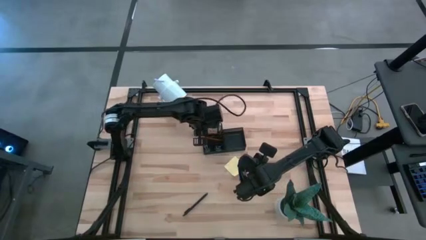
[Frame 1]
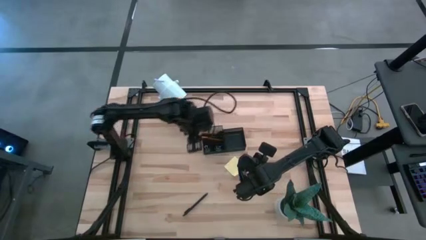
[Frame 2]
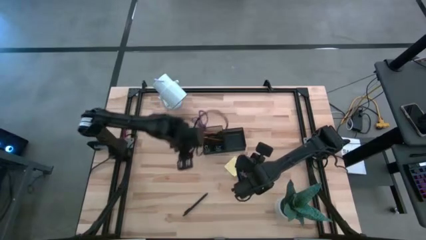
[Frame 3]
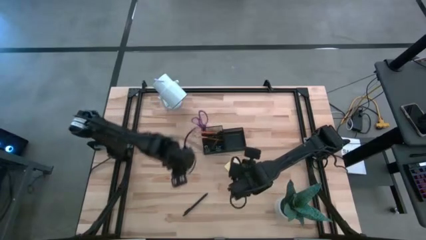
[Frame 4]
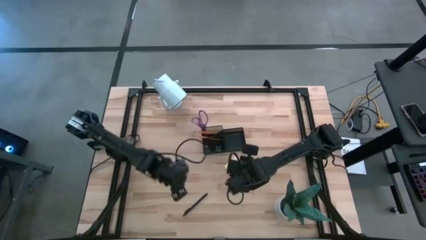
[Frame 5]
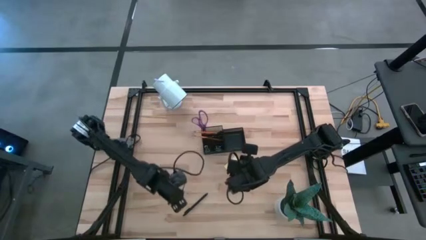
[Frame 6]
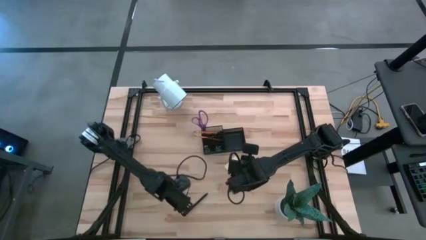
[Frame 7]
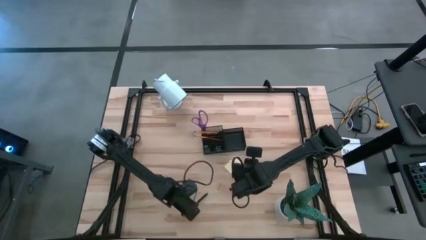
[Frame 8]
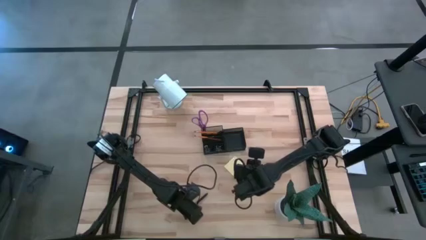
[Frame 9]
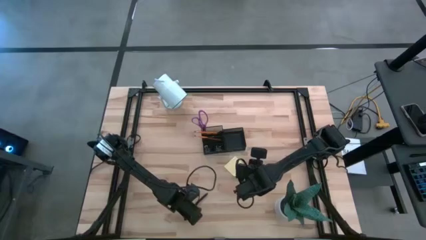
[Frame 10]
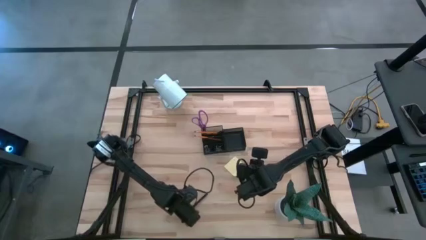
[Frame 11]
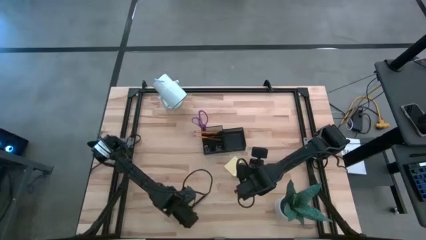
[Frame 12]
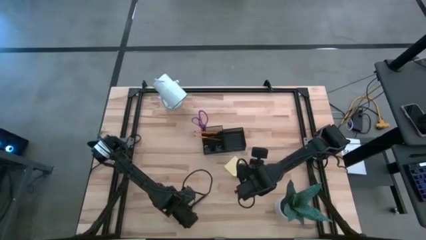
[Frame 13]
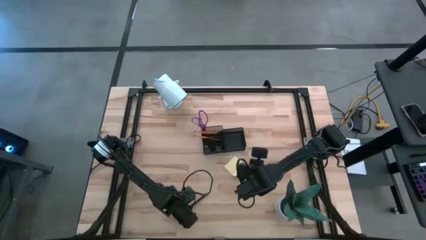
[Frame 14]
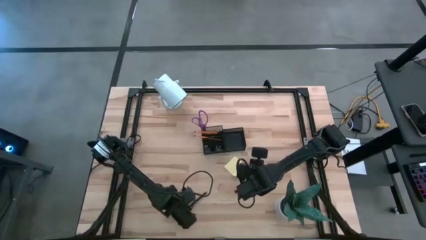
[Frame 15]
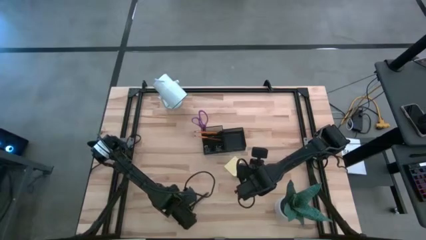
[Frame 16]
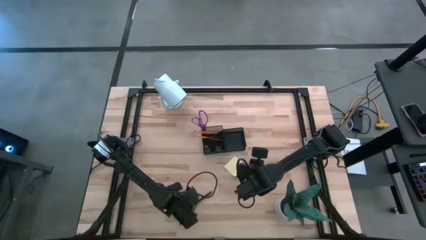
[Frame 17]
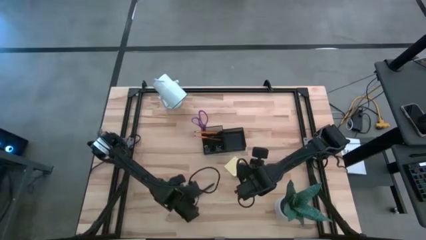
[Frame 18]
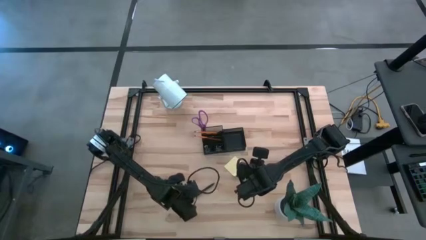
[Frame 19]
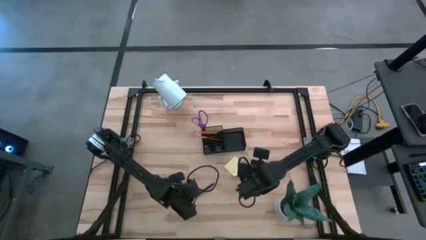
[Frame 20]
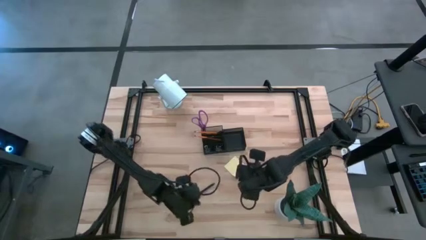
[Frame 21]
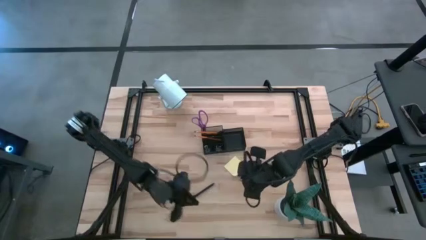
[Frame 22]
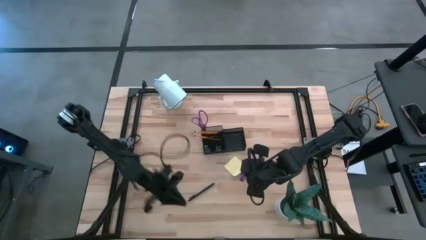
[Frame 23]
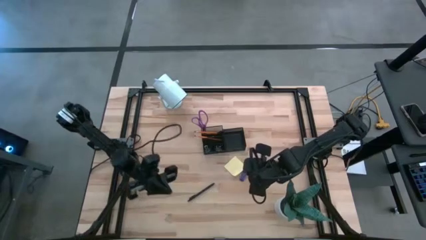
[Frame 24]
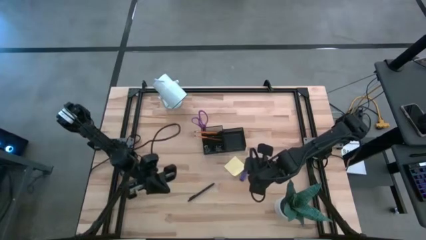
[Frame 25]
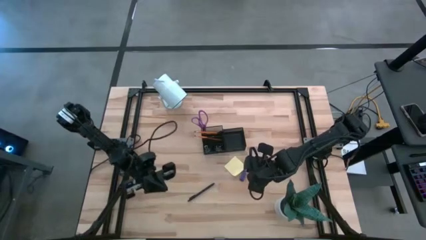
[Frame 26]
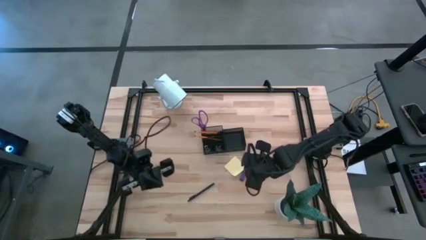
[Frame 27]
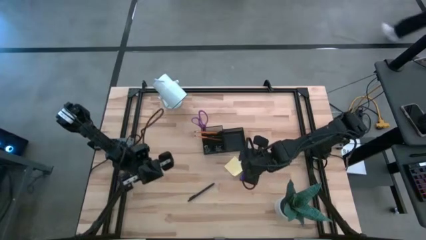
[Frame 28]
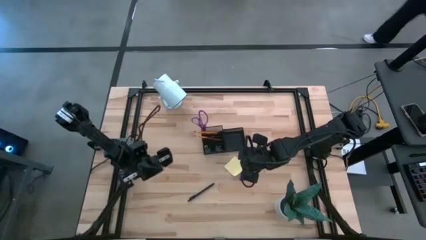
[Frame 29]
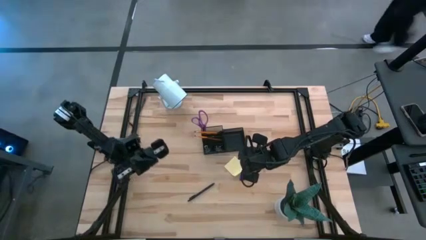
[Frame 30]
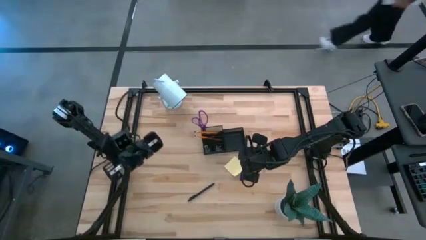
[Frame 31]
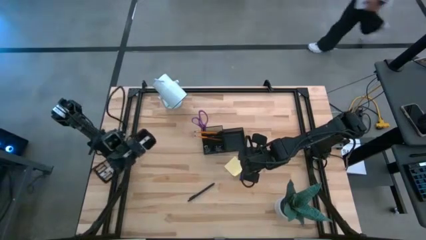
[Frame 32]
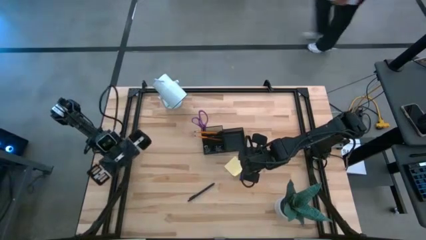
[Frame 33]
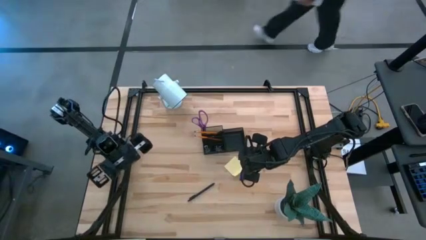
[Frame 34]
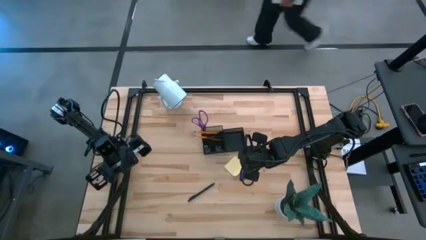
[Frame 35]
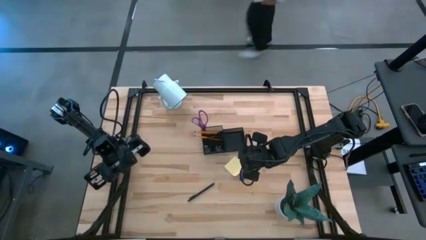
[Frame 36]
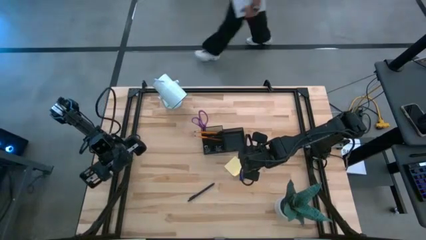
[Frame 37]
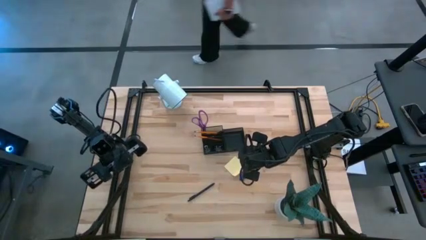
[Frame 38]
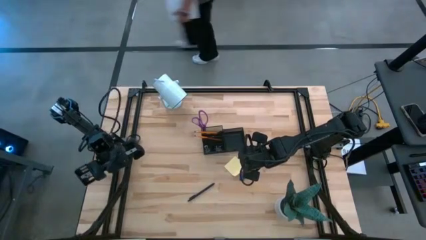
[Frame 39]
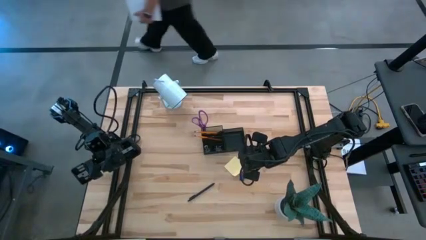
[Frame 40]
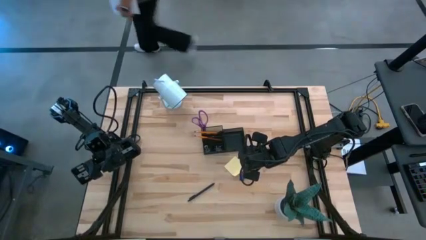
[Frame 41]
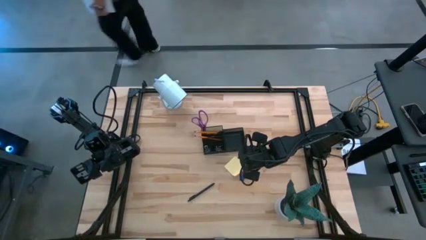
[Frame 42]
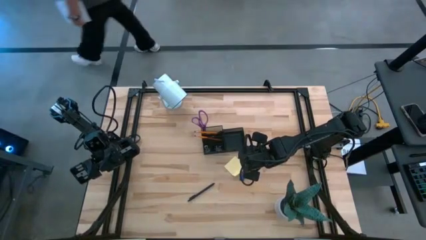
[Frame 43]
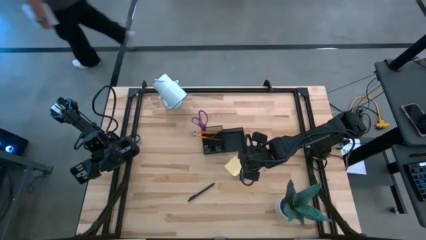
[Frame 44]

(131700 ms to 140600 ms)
Task: Pick and place office supplies into organizer
Put the black pen into the black desk organizer

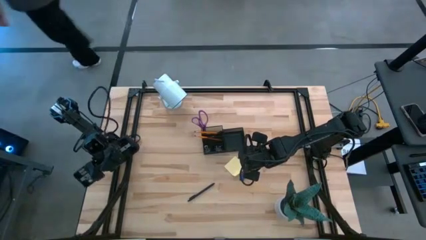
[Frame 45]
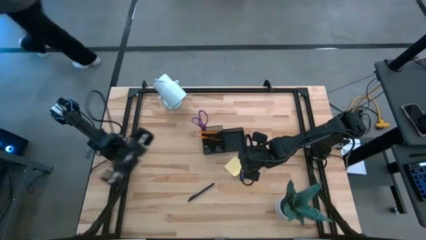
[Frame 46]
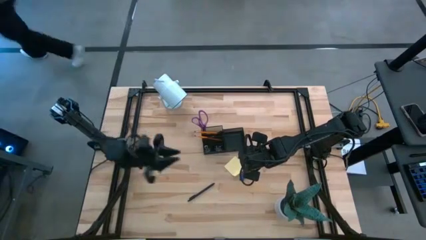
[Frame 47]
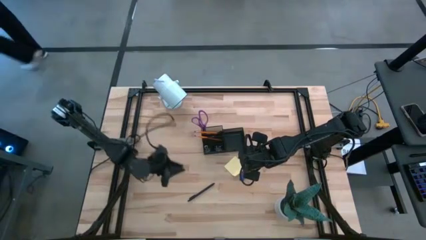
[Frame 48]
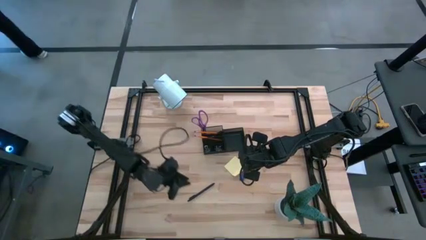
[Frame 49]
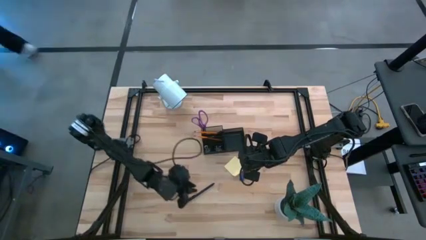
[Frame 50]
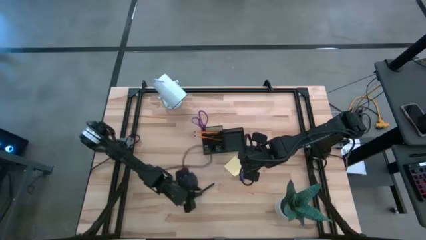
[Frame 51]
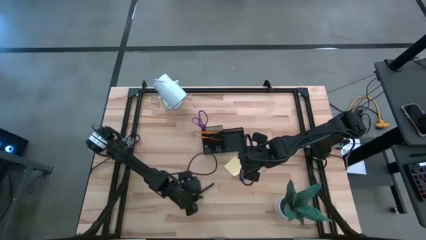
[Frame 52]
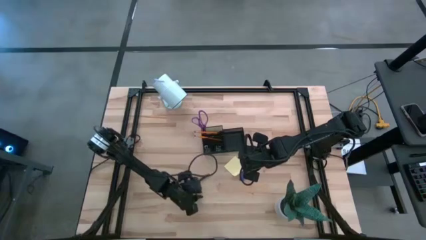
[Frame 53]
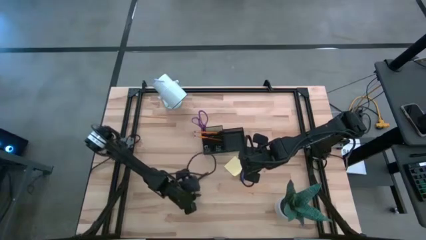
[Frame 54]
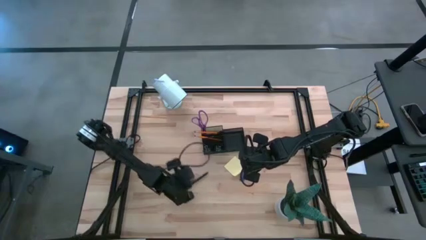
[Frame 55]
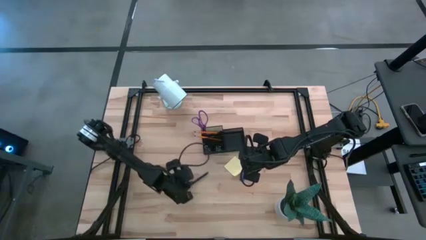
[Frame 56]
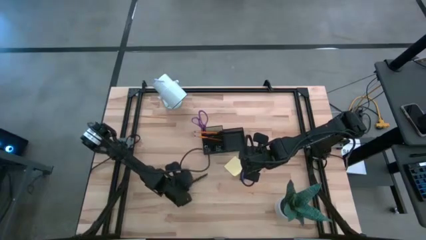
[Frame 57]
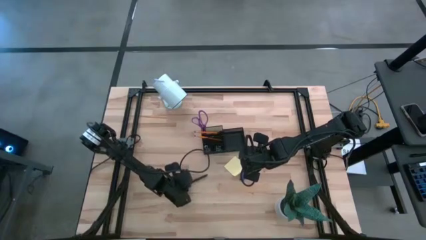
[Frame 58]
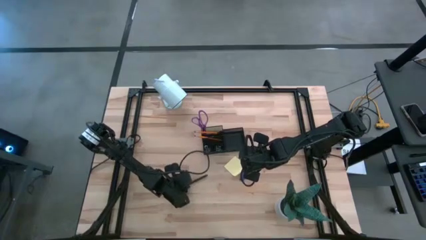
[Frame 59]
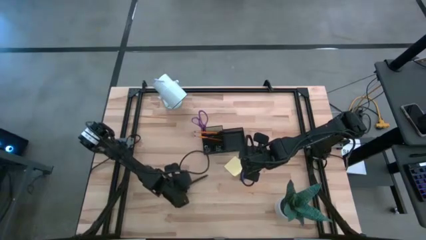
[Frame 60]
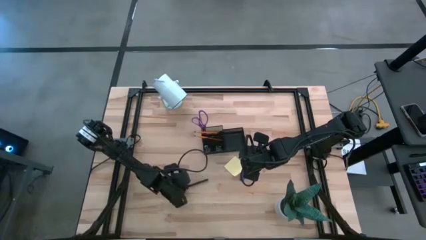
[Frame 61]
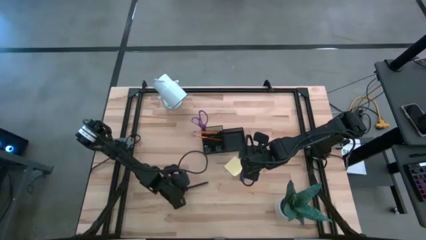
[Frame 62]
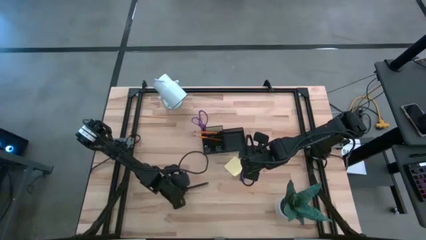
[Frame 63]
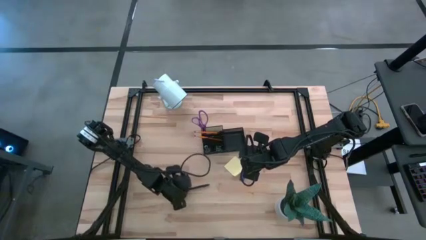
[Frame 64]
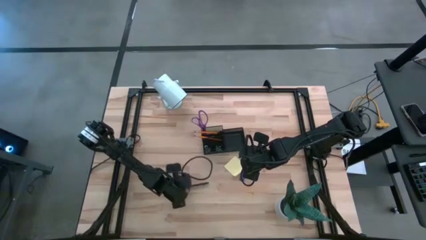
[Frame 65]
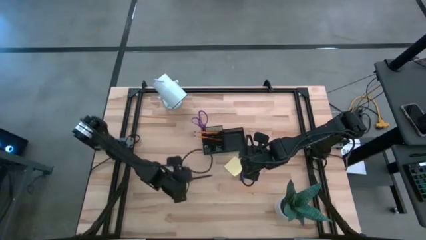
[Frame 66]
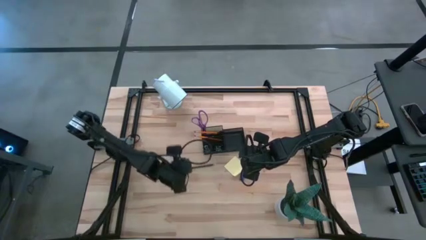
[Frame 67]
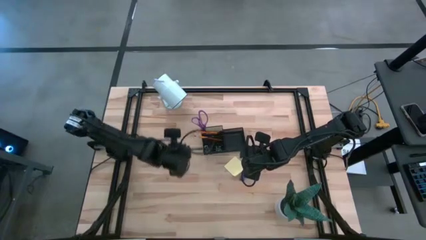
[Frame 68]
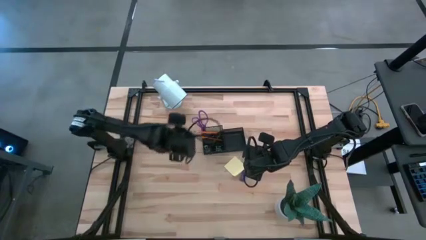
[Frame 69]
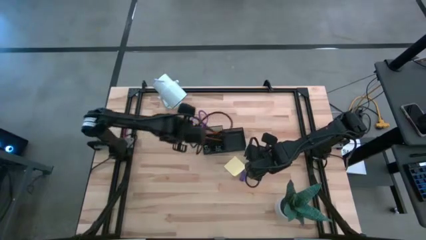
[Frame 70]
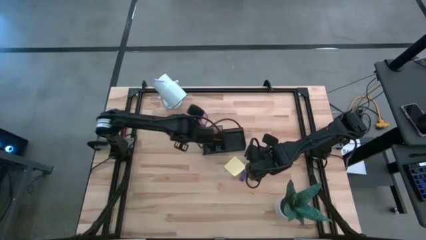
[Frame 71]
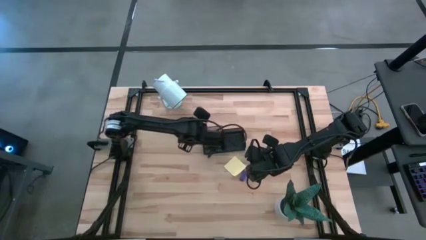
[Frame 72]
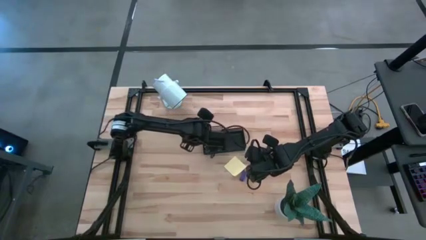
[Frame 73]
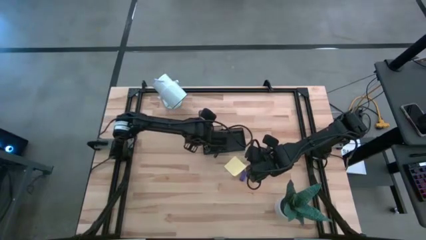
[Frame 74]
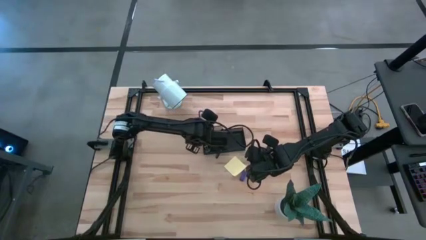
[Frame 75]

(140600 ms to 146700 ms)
Put the black pen into the black desk organizer

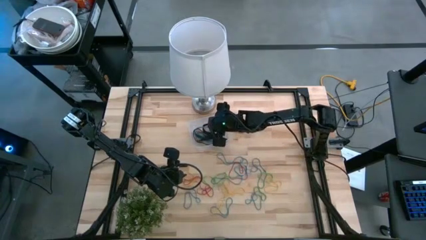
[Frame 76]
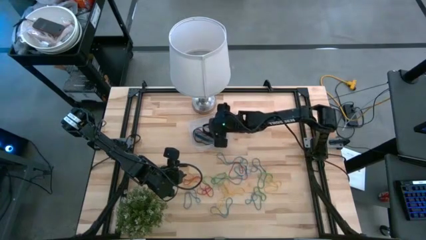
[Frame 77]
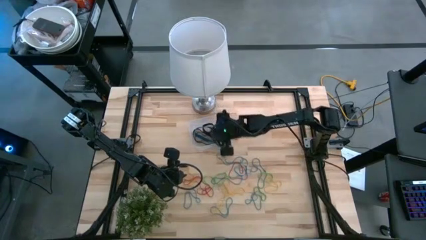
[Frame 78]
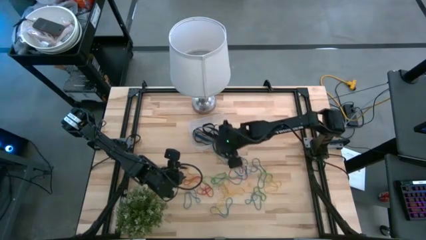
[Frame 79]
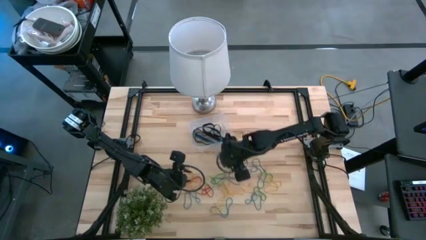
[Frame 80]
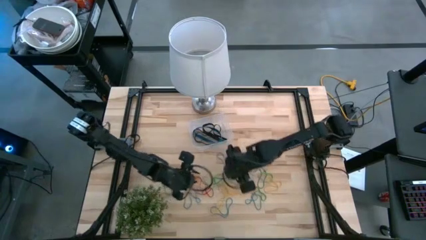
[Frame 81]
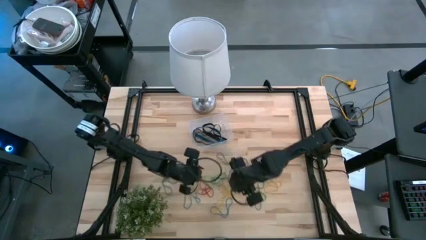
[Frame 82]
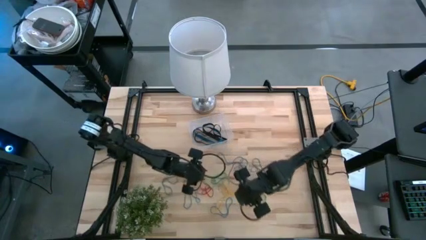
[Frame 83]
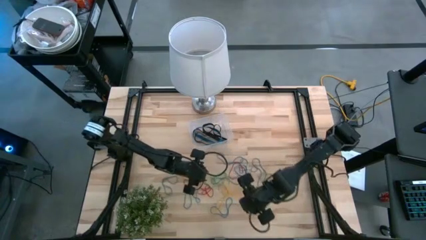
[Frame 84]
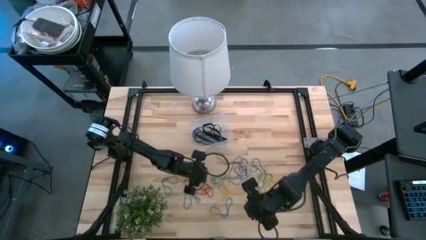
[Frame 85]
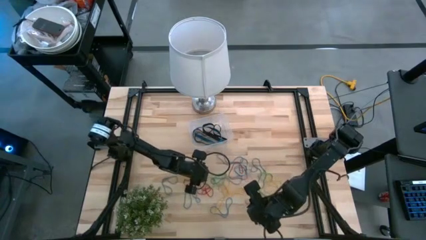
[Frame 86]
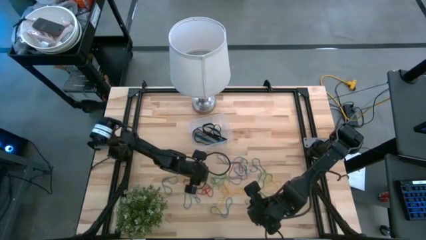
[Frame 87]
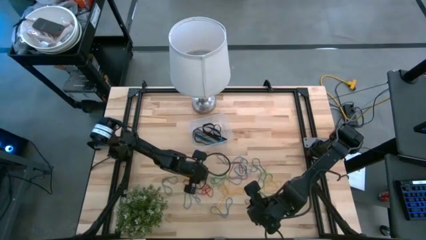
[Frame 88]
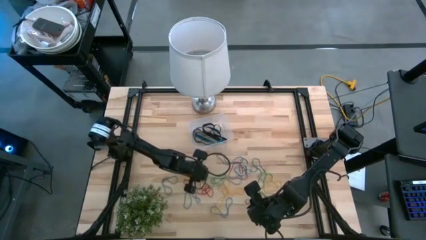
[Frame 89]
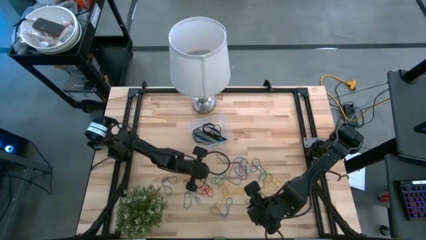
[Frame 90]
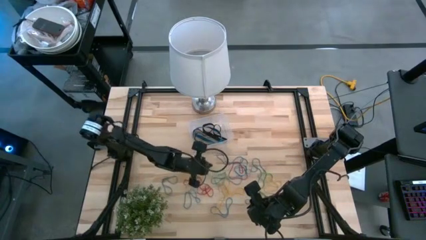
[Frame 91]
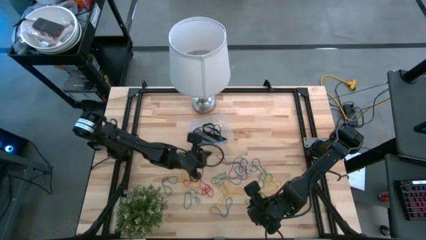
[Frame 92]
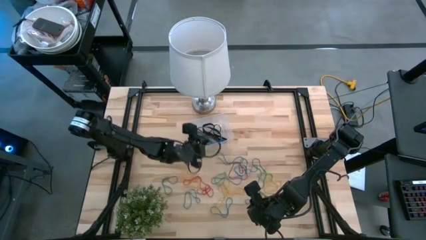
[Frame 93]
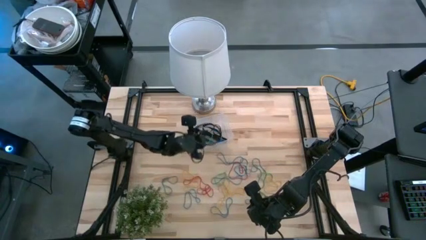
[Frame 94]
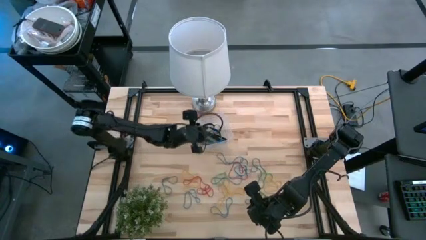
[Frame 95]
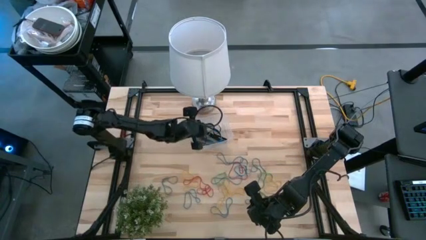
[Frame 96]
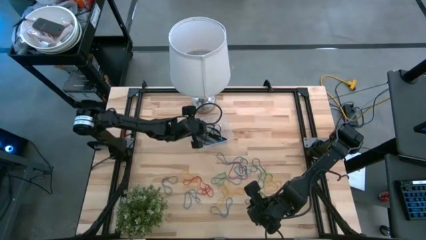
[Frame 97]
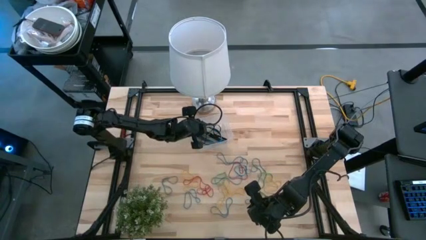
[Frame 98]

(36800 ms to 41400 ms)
Task: Pick and place rubber bands into bin
Put the green rubber band into the transparent container
